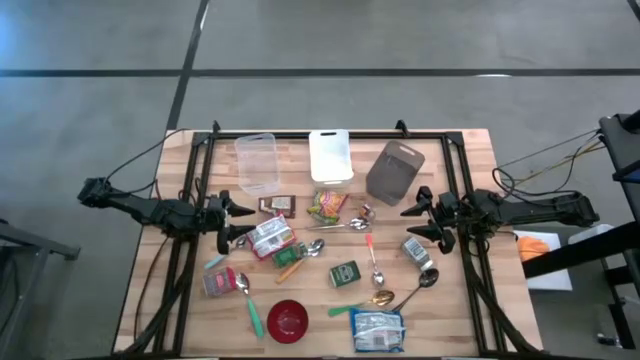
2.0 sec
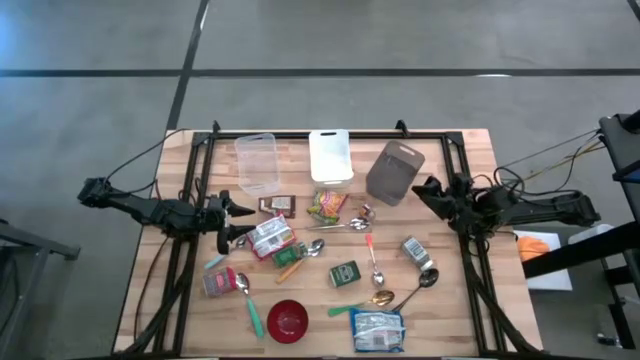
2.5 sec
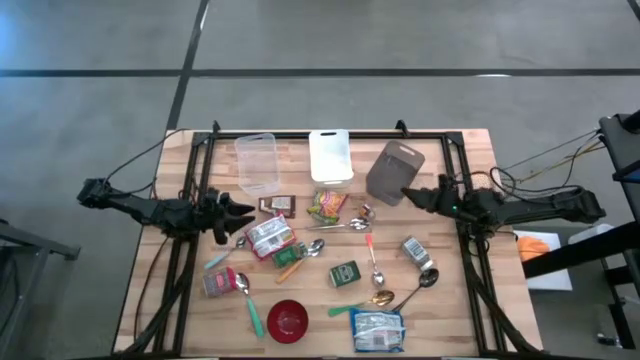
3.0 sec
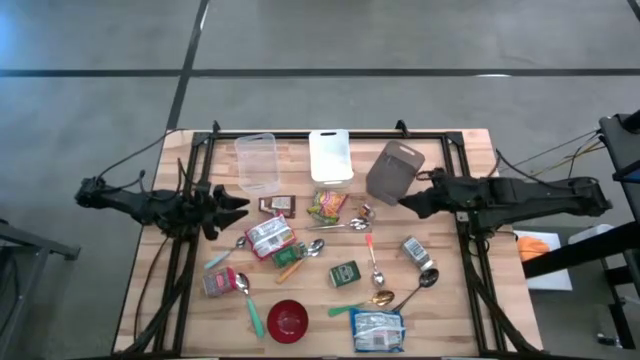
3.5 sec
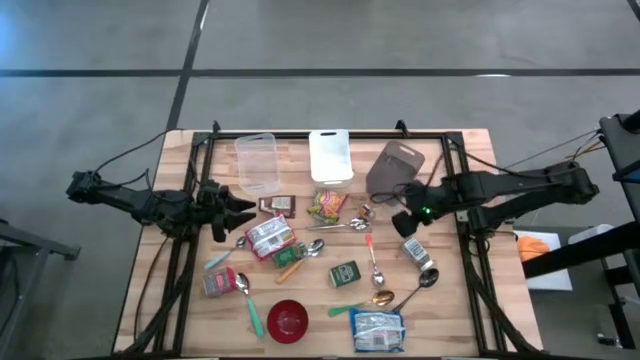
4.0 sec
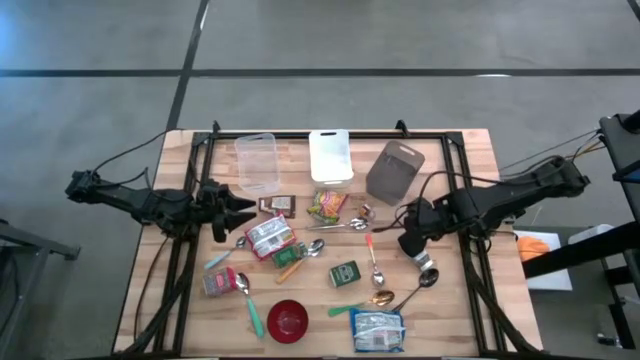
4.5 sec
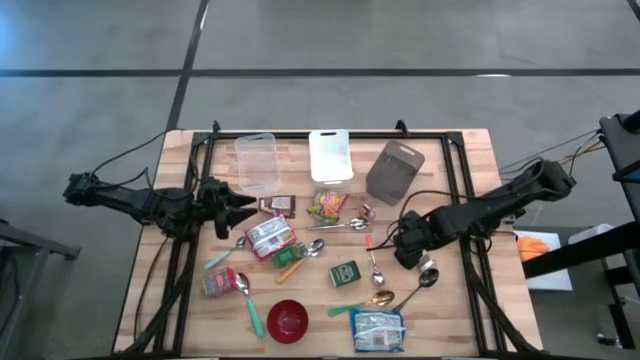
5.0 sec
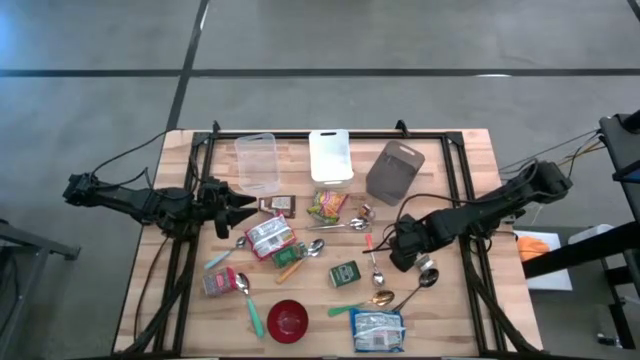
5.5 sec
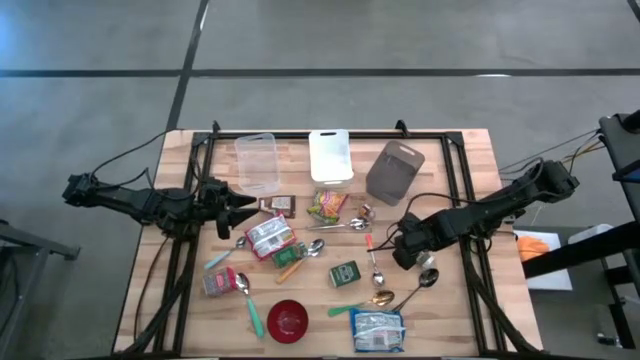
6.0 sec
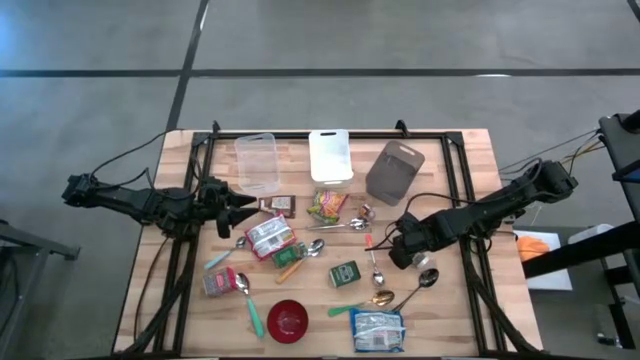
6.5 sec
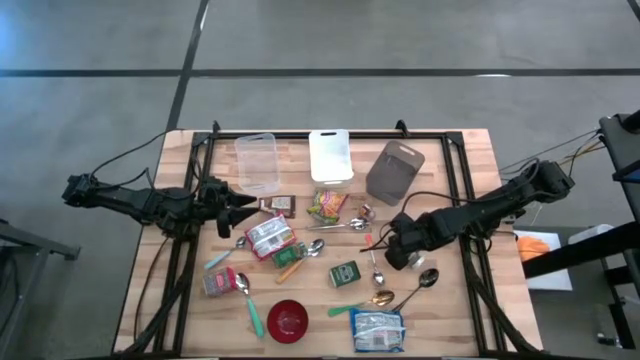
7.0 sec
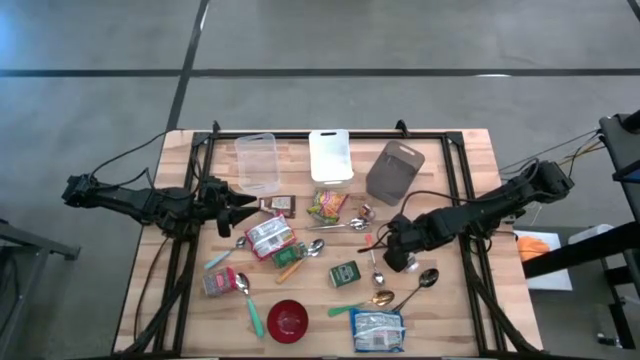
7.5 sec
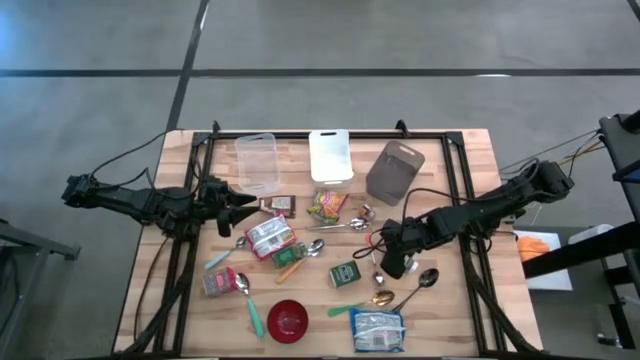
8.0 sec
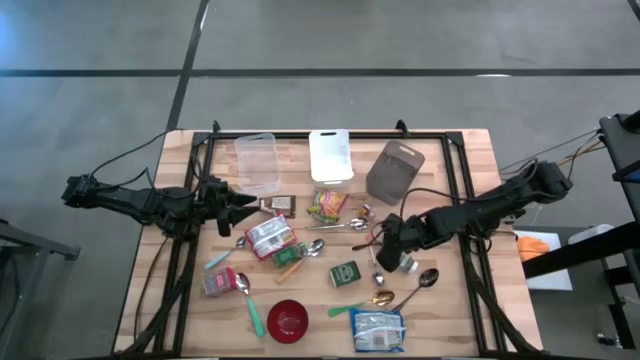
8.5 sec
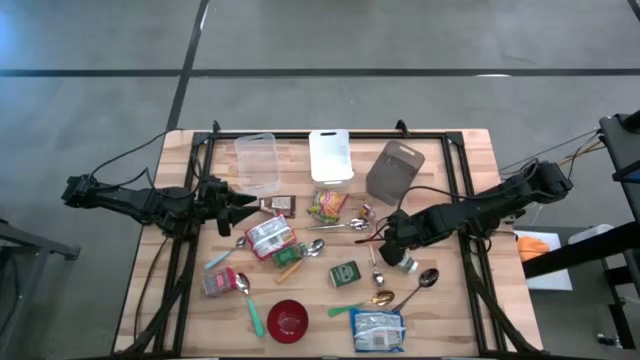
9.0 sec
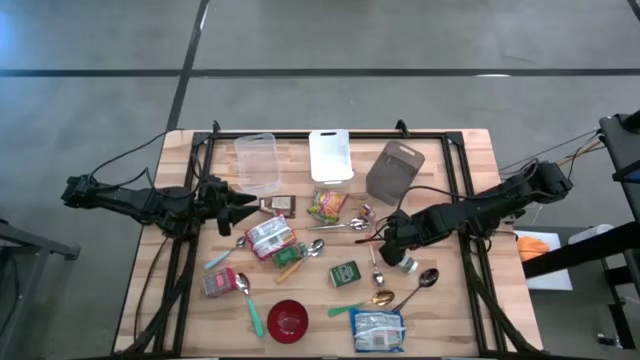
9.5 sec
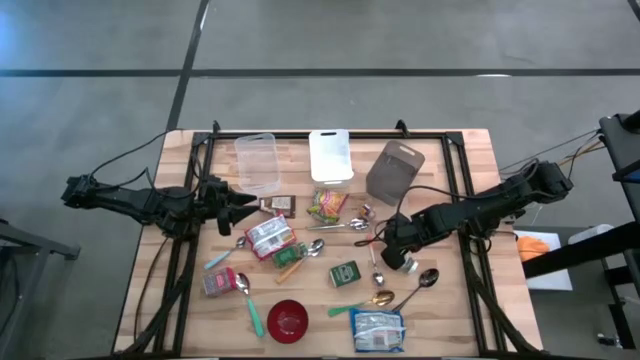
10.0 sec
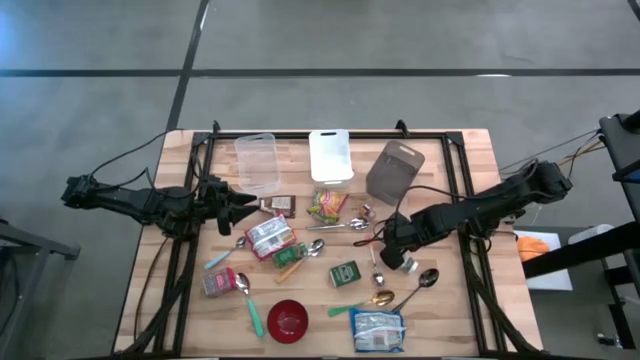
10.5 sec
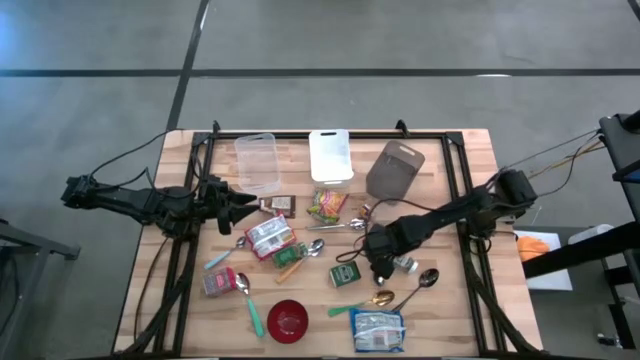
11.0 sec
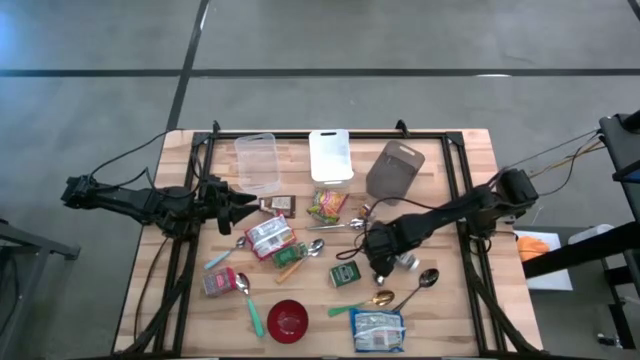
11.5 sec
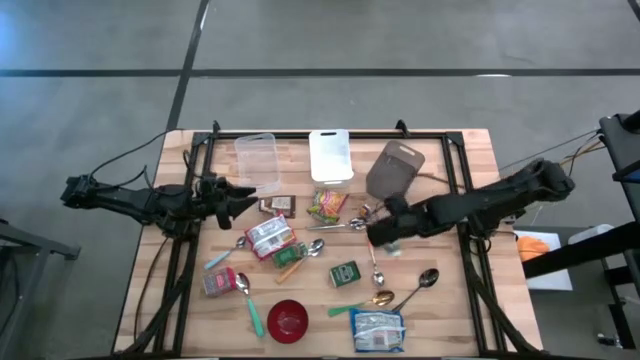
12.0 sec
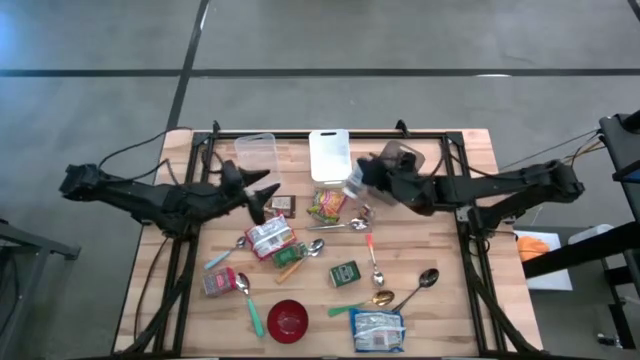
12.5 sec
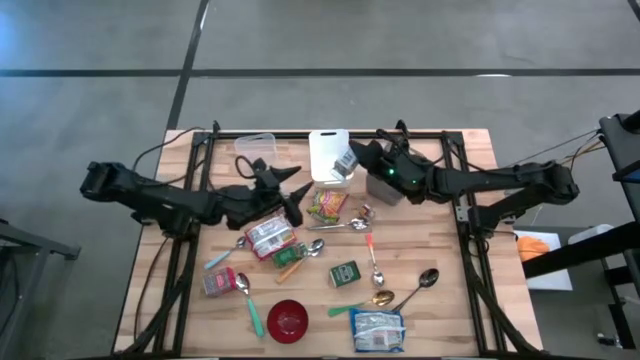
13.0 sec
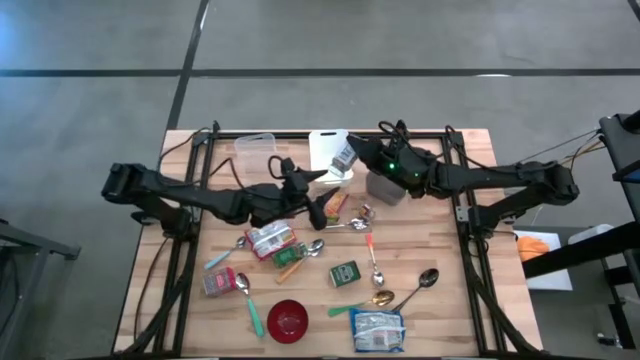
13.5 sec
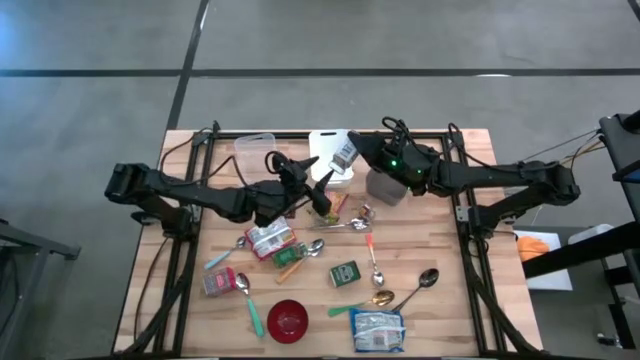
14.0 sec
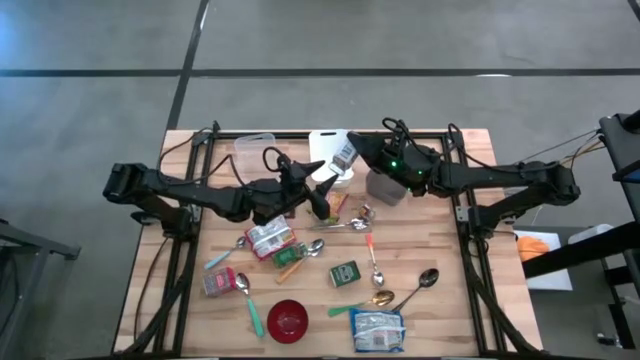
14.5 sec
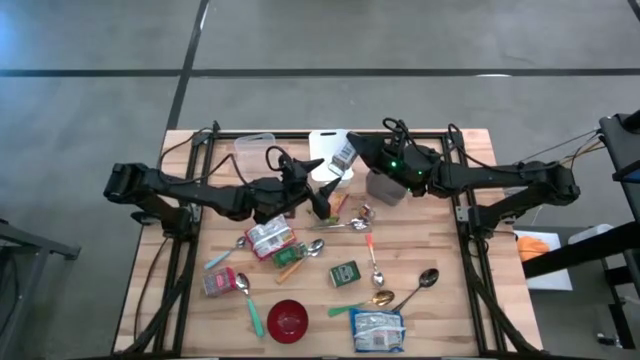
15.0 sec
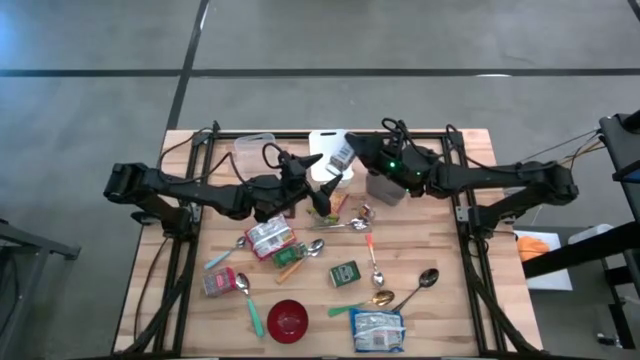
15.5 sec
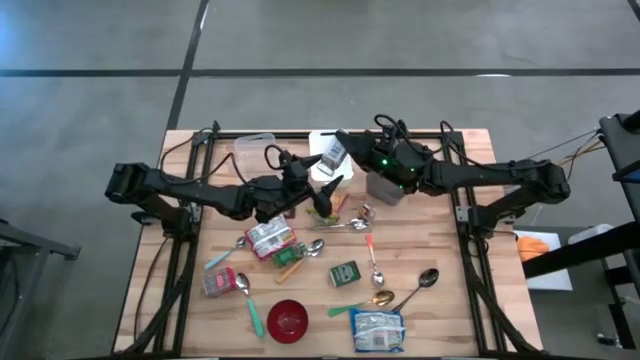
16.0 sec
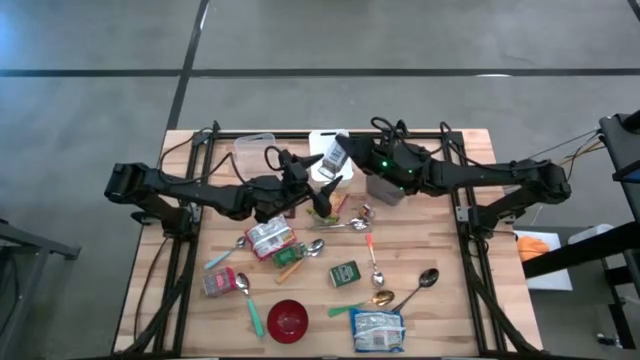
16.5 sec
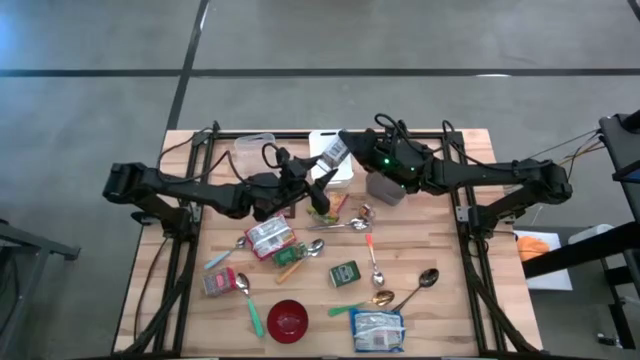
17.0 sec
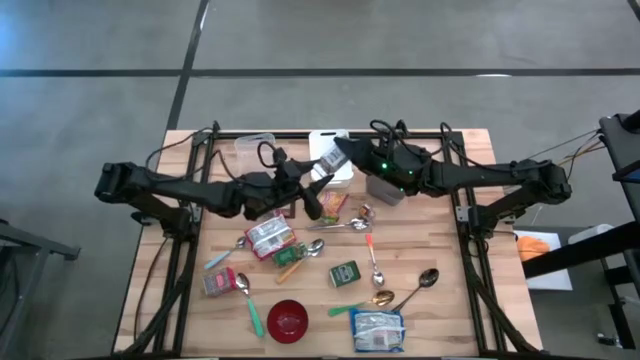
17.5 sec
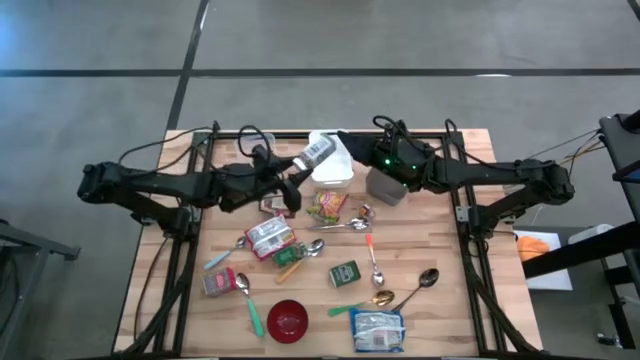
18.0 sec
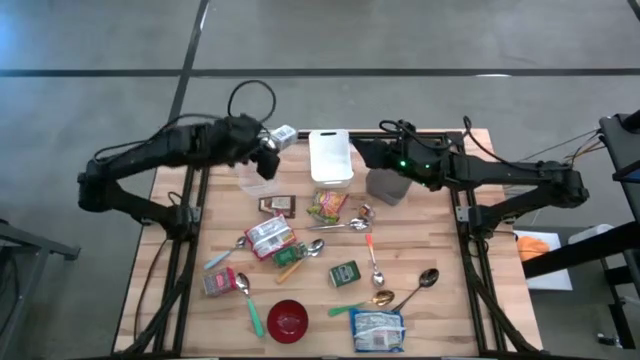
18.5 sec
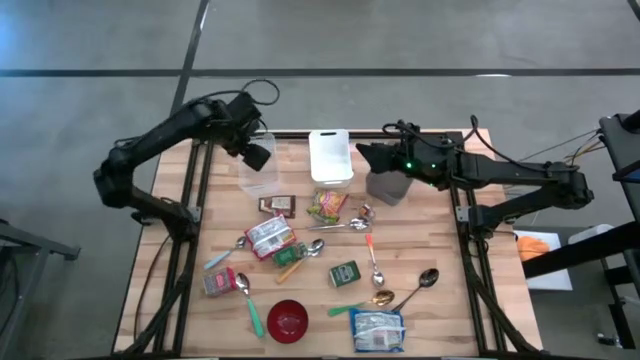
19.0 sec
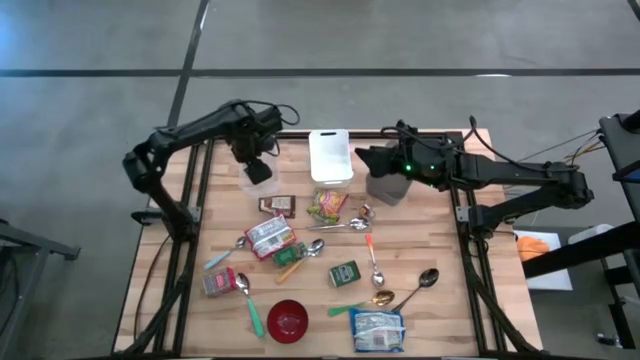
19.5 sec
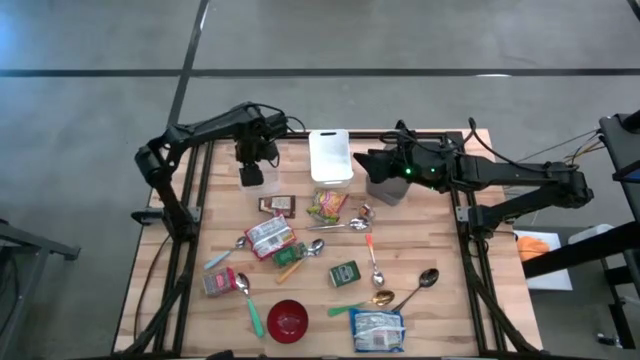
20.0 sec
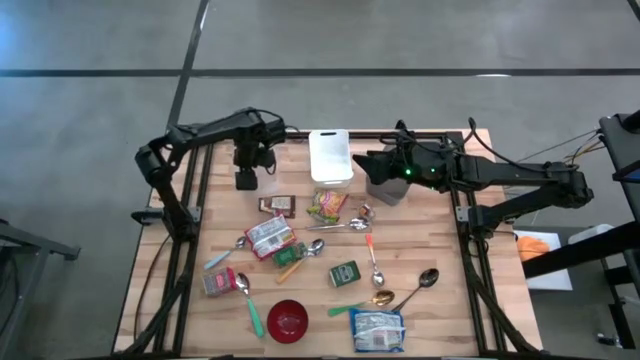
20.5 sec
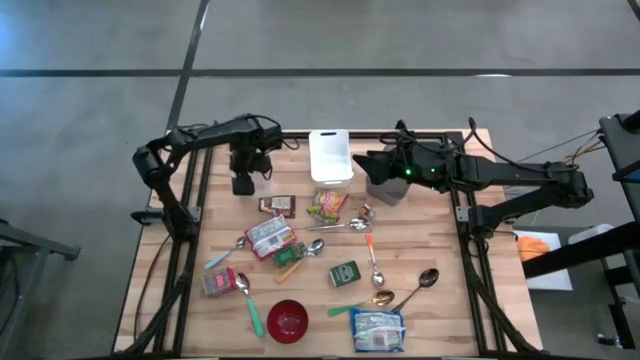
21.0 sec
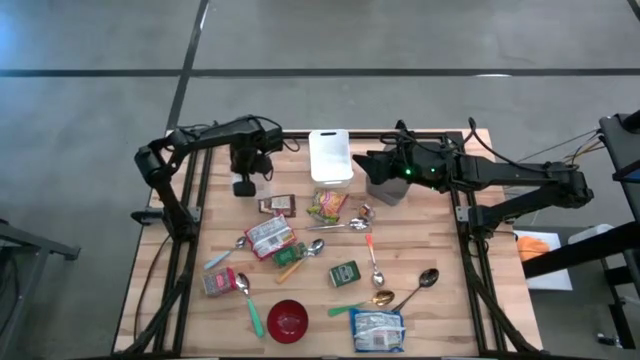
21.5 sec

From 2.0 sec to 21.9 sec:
Put the white seasoning bottle into the transparent bin
